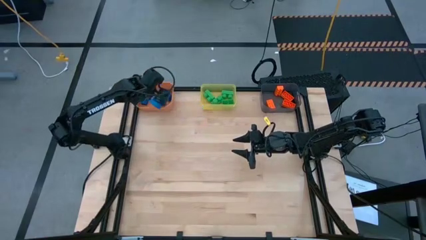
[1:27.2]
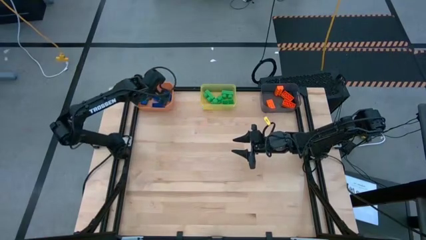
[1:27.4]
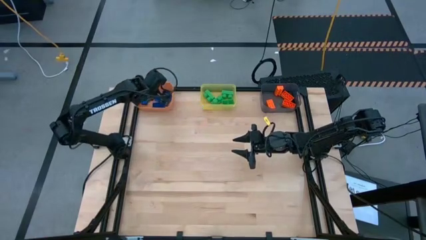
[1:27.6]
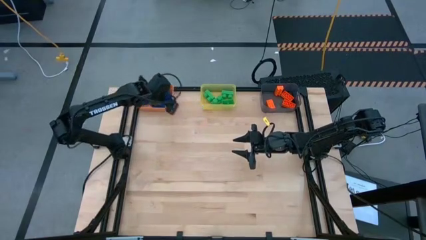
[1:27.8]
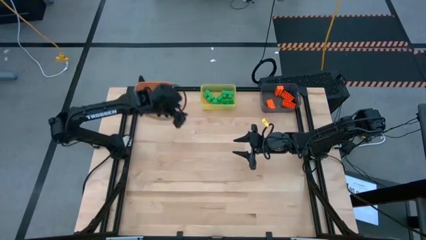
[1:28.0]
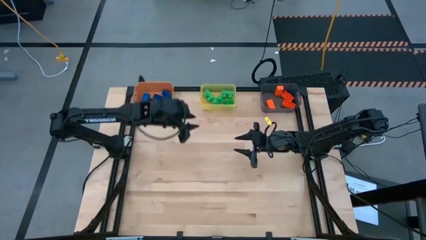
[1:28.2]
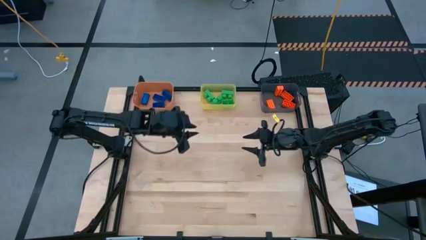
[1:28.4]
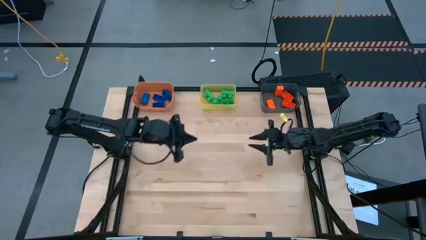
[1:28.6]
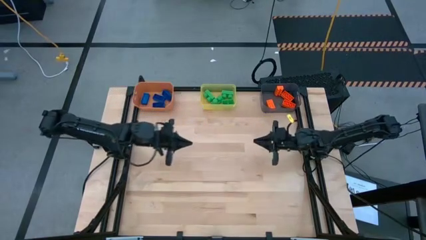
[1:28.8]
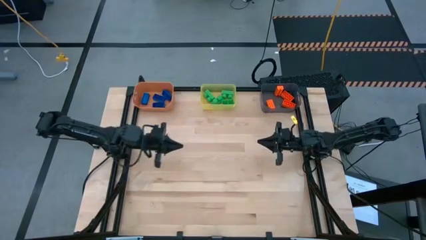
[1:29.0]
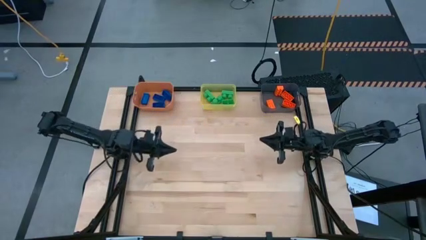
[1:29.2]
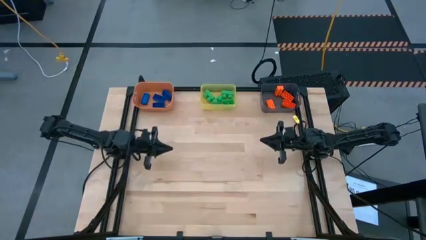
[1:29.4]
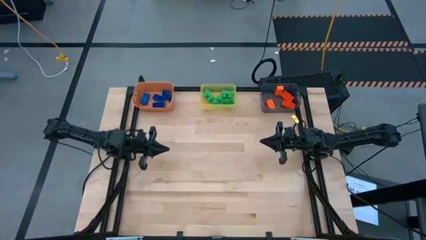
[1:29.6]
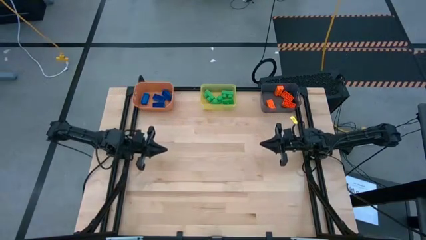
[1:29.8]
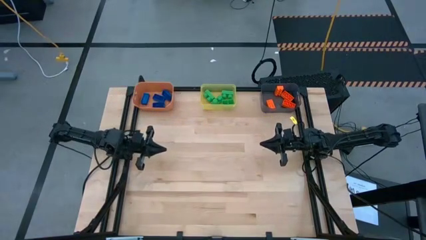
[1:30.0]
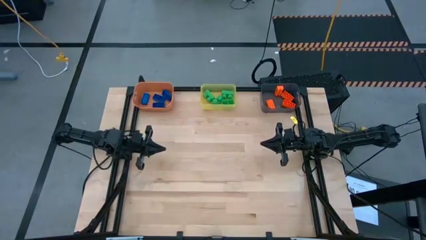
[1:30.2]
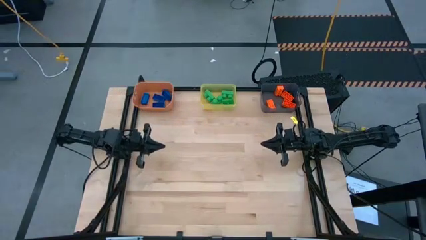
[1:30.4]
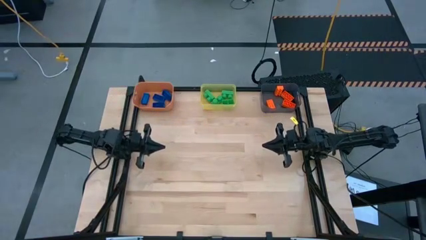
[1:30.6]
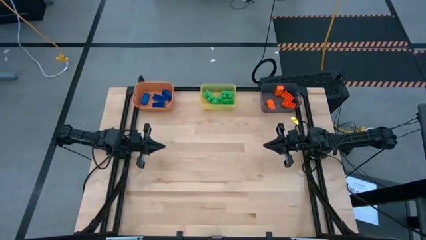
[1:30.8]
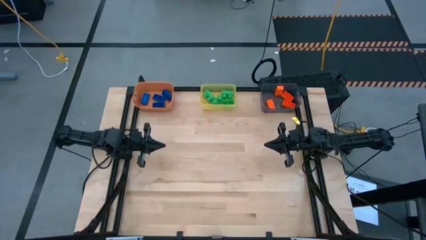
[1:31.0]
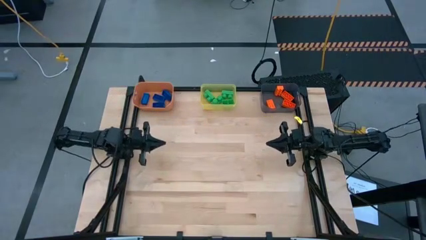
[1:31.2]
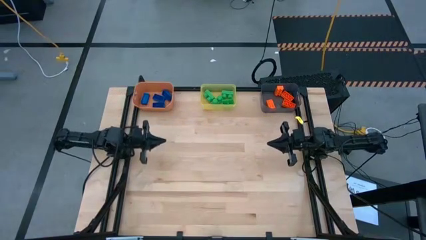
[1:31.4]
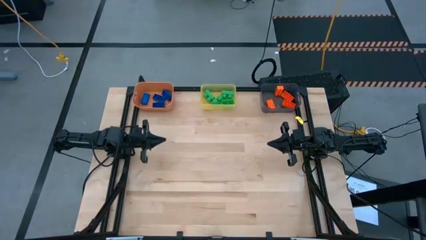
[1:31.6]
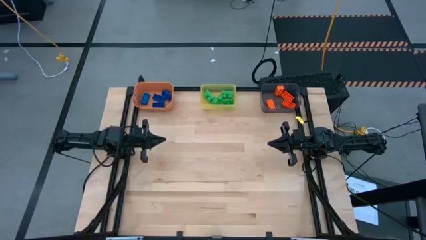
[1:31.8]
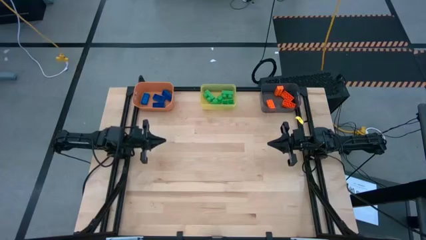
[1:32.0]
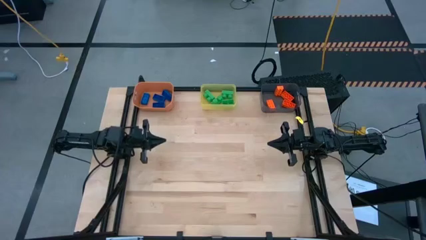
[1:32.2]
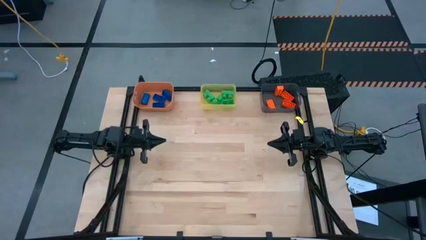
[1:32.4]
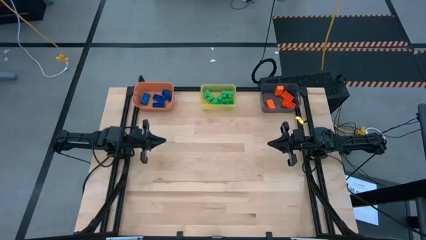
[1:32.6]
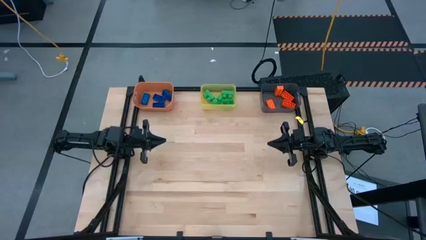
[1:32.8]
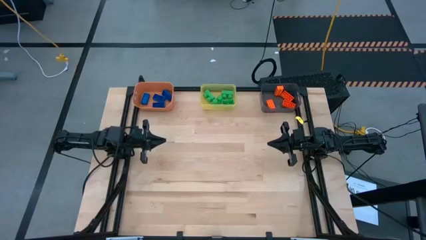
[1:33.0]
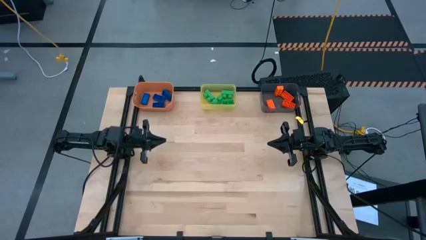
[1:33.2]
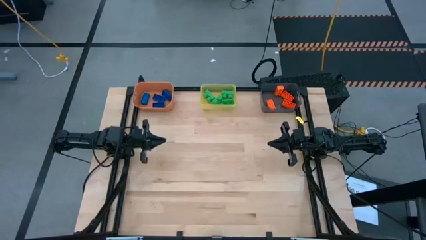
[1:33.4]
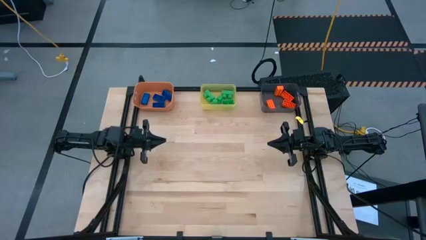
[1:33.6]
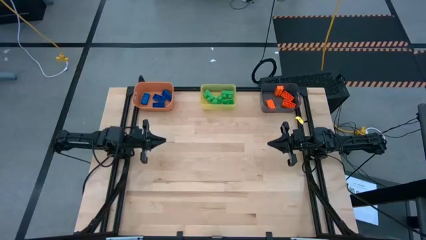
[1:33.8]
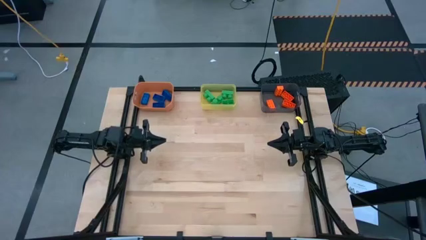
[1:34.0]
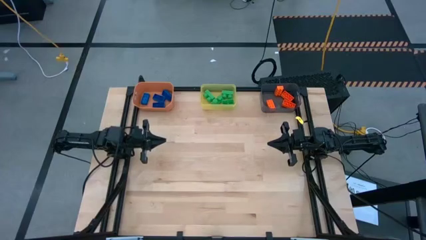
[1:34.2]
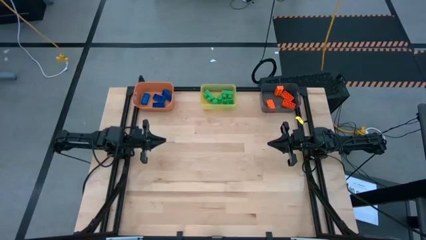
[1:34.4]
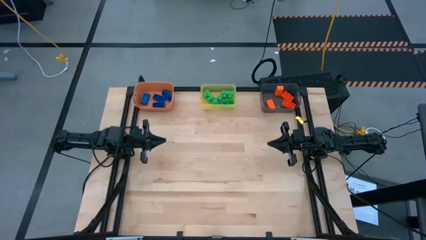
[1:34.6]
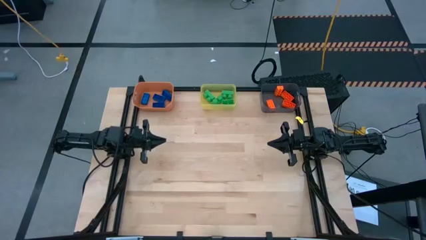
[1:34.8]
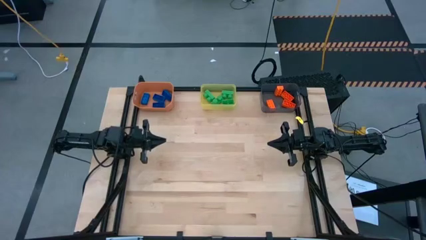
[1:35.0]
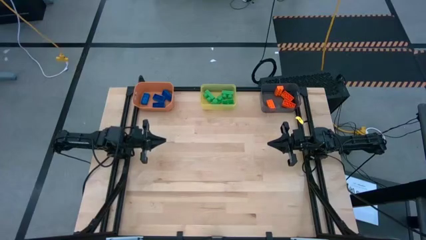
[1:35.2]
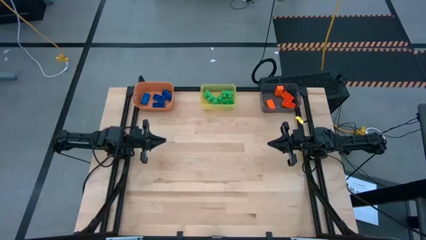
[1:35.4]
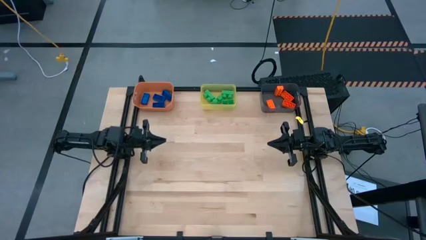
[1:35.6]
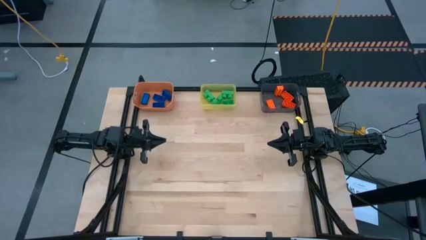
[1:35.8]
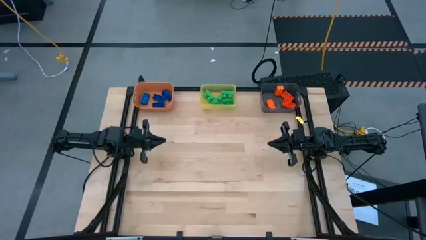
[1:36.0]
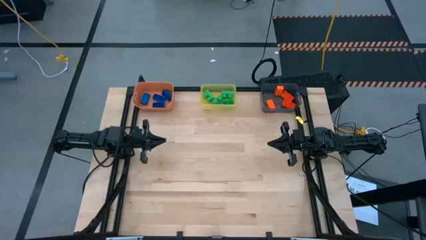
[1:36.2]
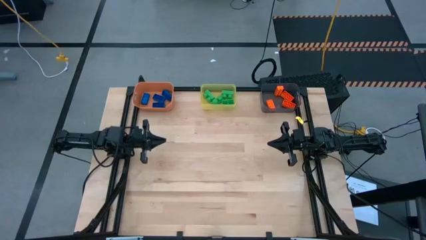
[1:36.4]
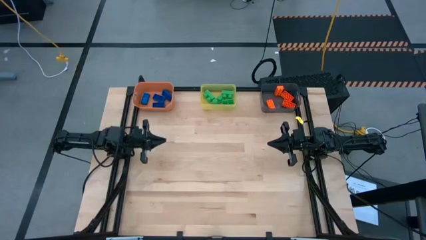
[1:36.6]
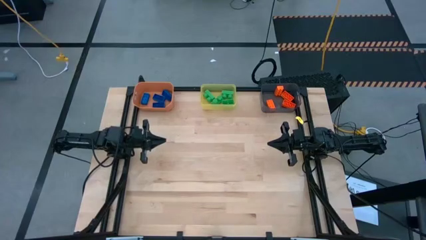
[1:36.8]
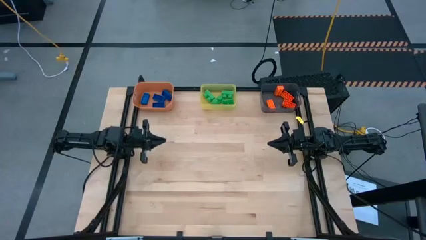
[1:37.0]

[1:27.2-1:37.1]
Task: Sort & place blocks by color
Return to Home Position
